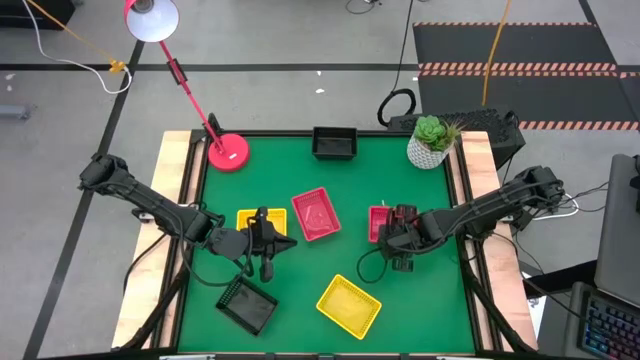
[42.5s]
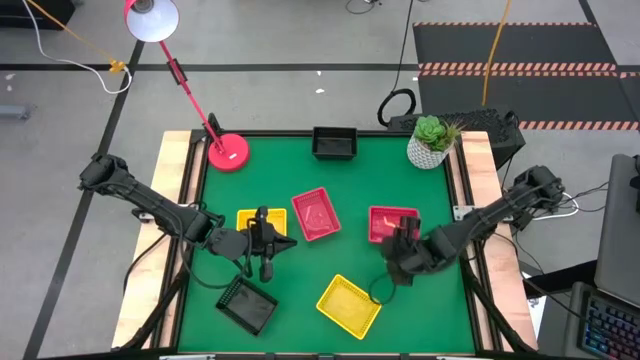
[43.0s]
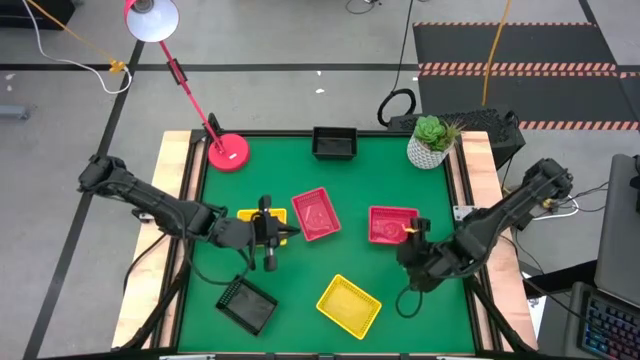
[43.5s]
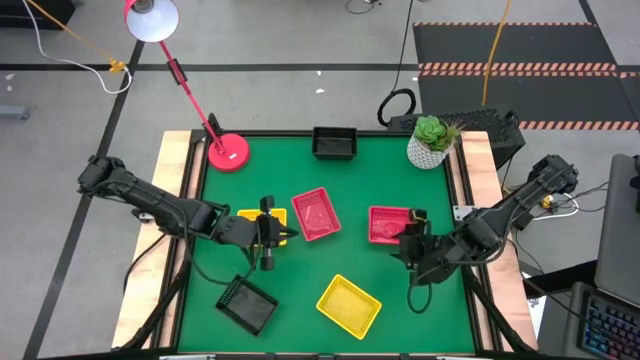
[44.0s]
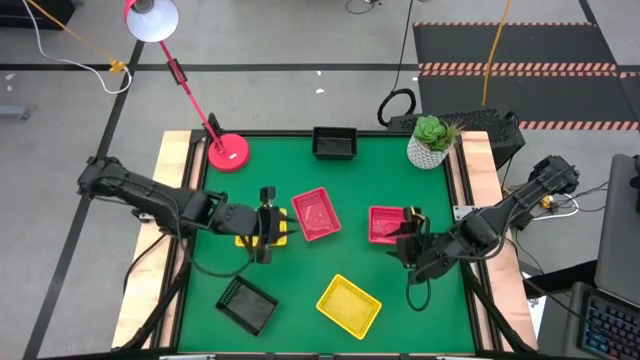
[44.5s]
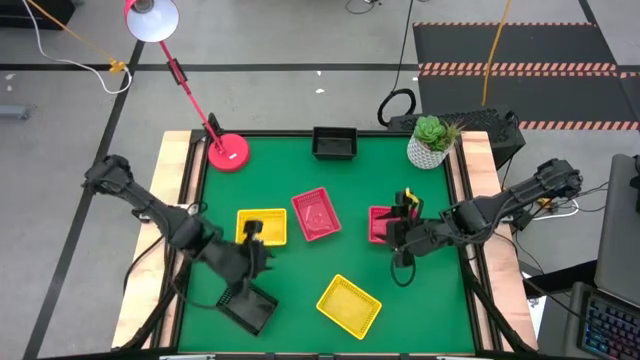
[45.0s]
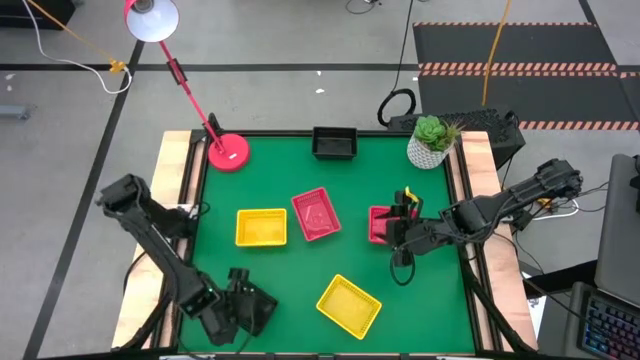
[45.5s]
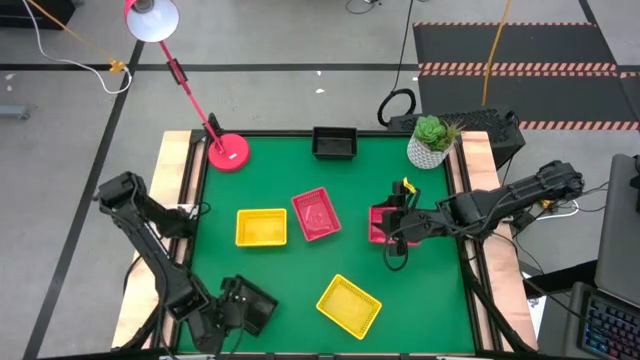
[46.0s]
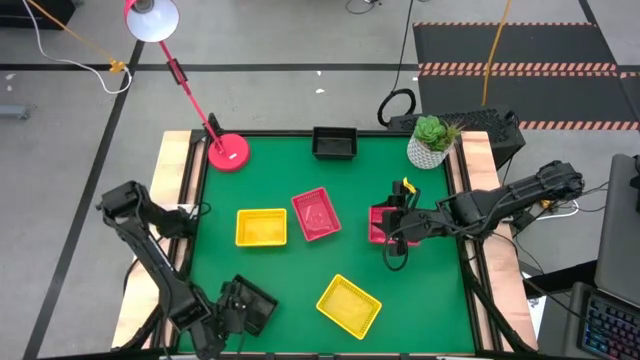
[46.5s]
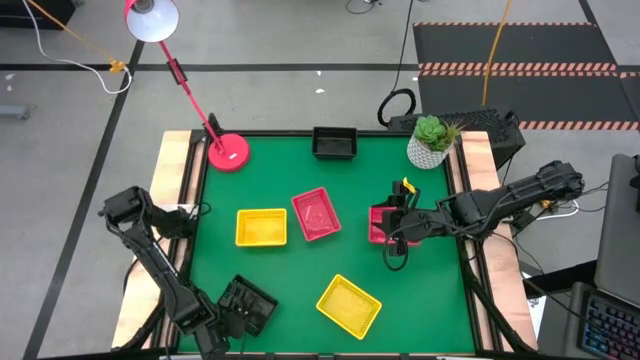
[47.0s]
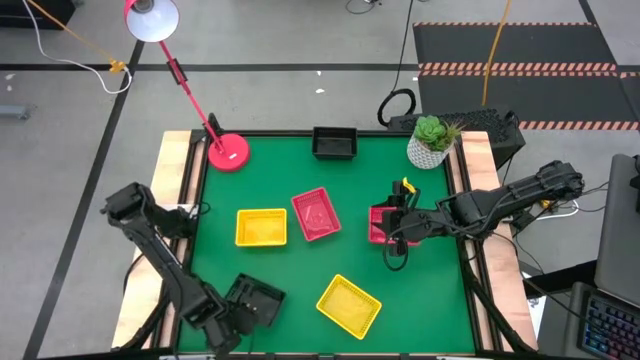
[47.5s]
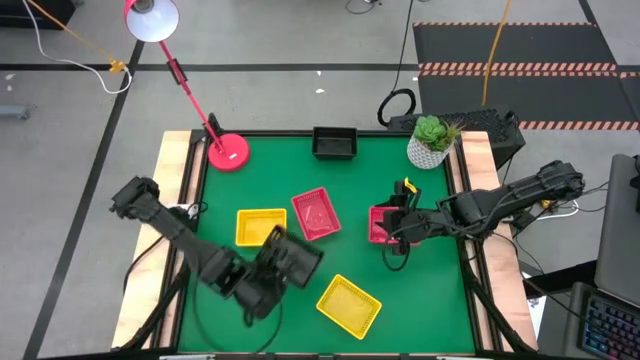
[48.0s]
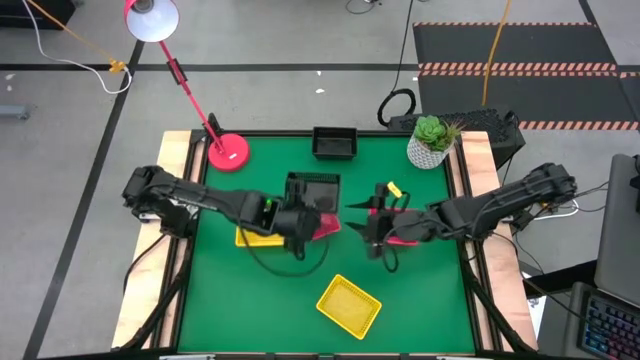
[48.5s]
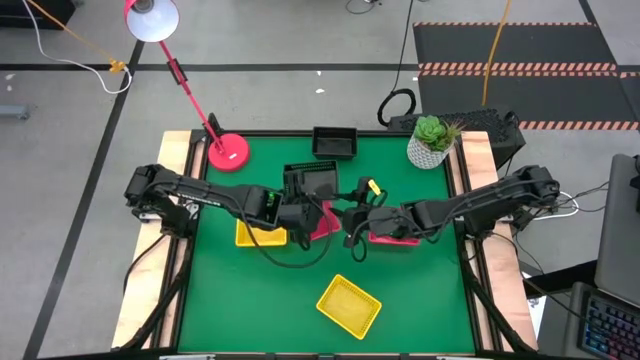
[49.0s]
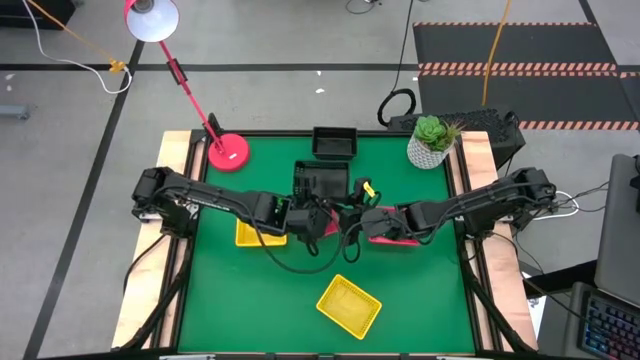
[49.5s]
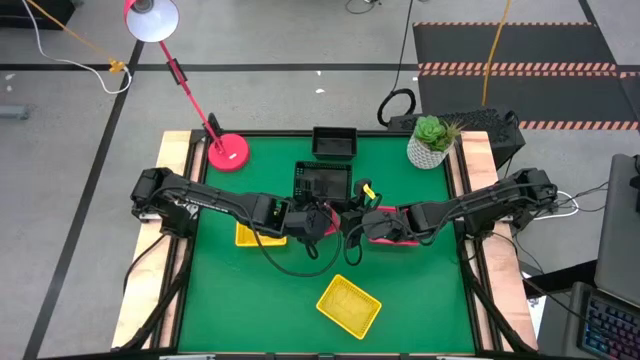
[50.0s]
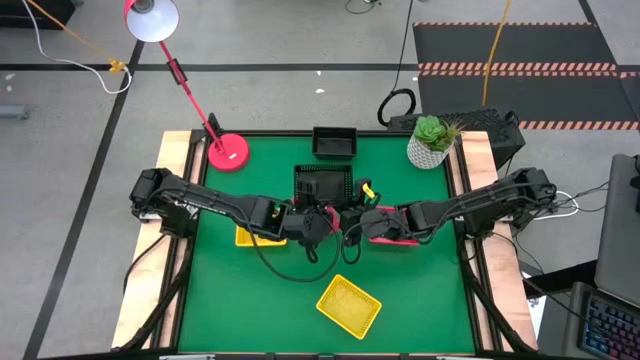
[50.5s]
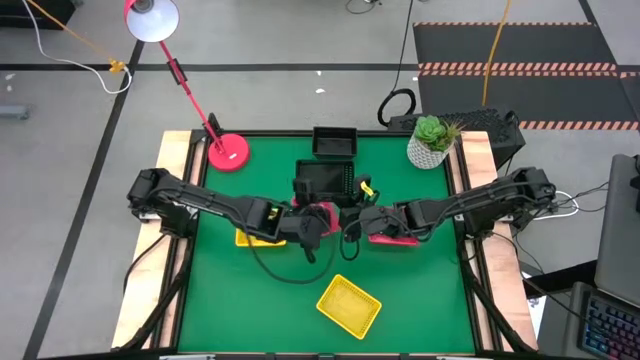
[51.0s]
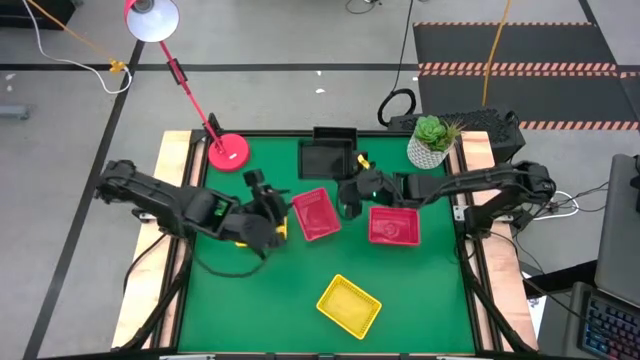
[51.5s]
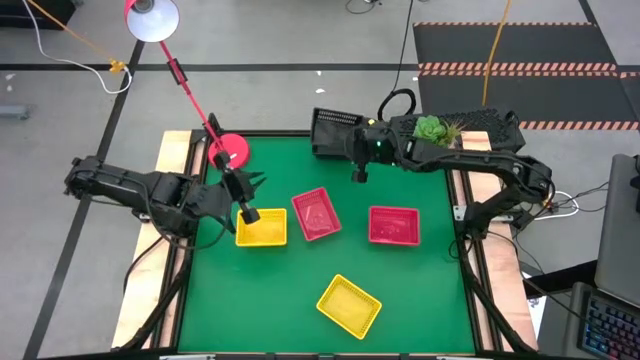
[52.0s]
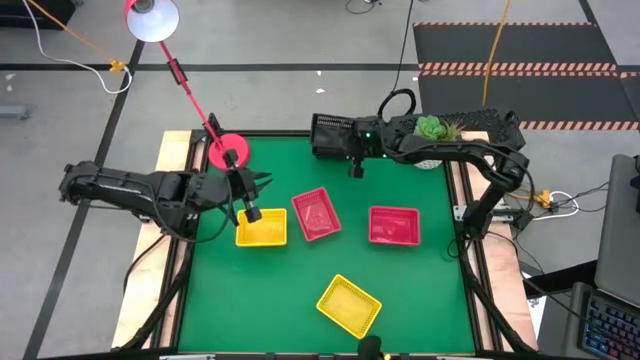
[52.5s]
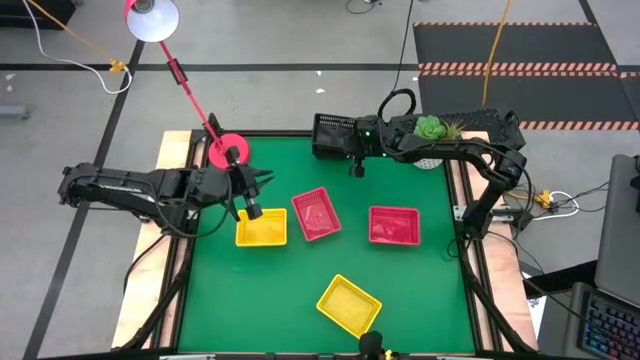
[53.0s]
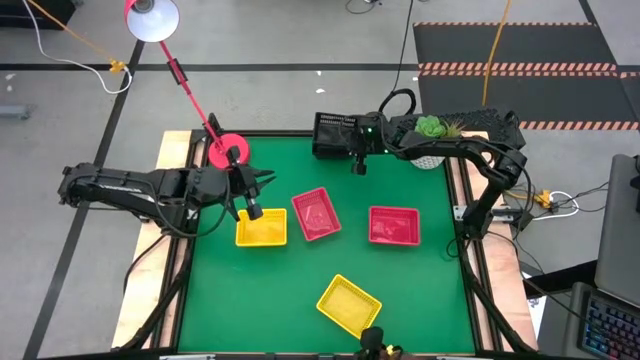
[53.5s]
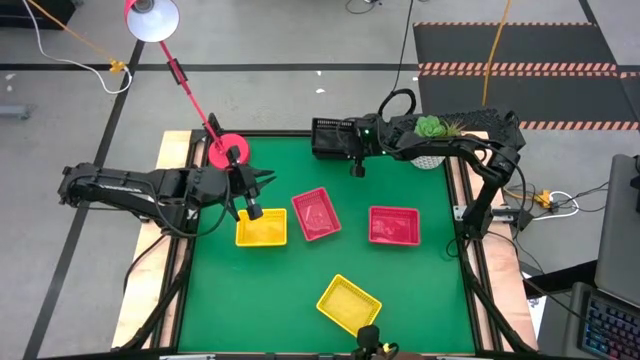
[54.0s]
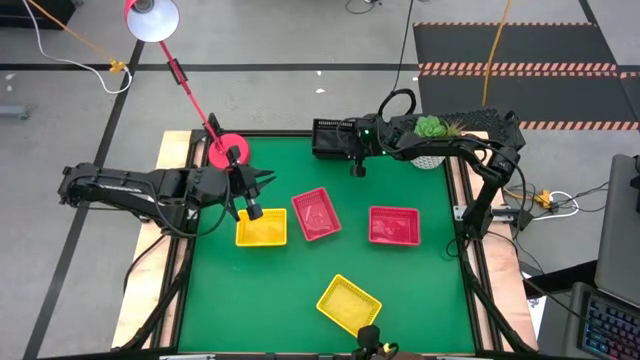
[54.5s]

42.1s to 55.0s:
Stack the bottom black bin on the top stacked black bins
